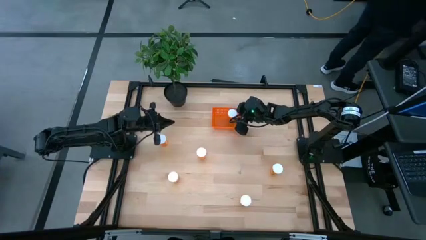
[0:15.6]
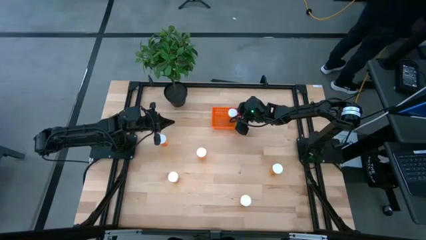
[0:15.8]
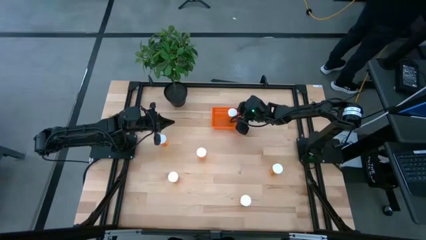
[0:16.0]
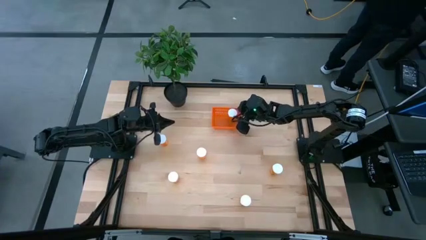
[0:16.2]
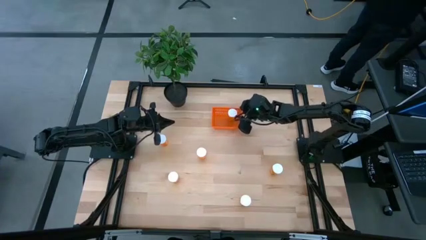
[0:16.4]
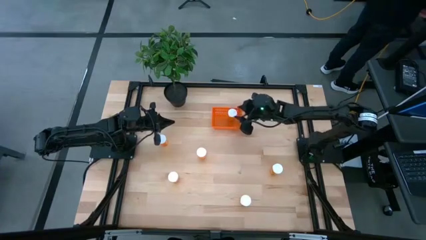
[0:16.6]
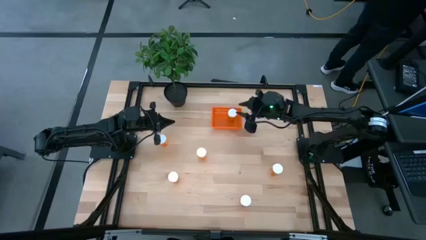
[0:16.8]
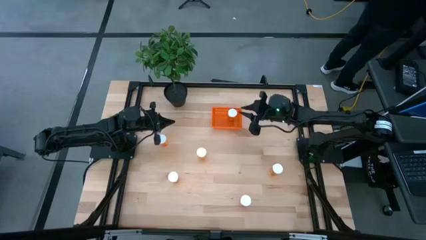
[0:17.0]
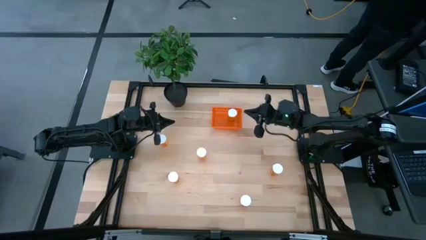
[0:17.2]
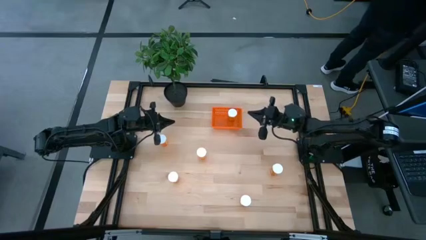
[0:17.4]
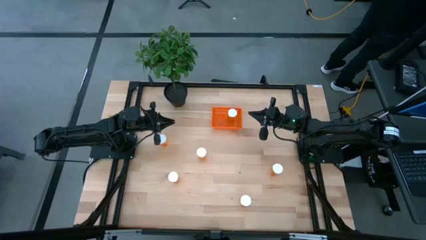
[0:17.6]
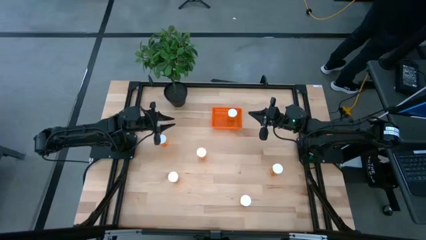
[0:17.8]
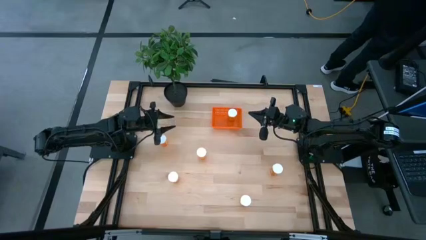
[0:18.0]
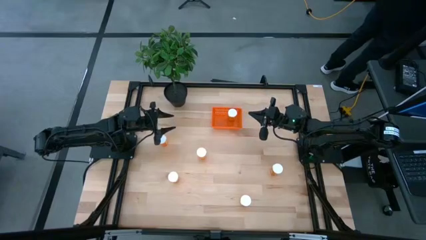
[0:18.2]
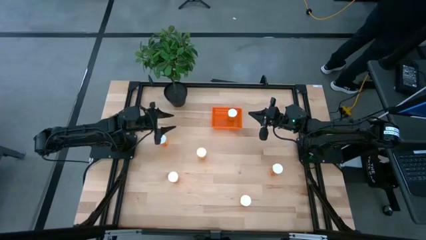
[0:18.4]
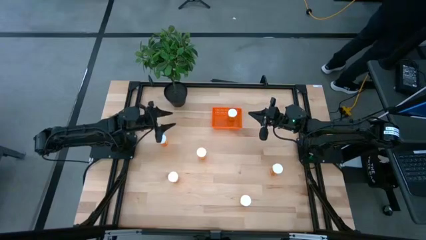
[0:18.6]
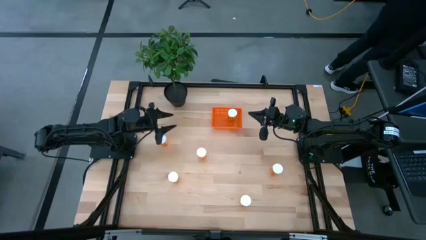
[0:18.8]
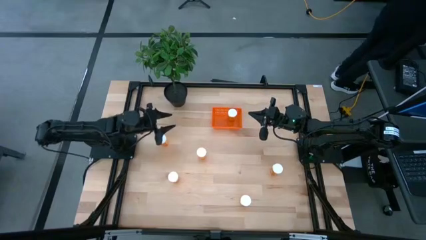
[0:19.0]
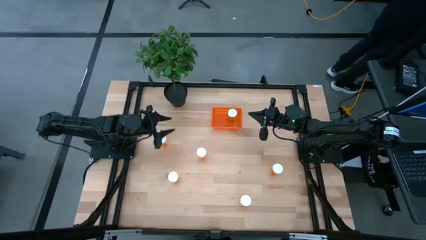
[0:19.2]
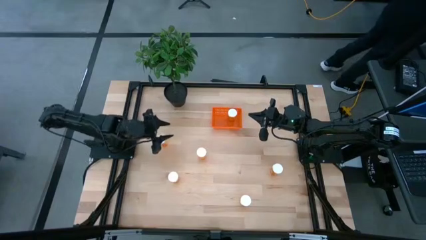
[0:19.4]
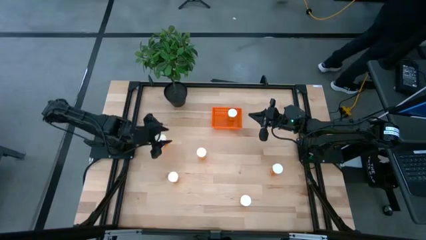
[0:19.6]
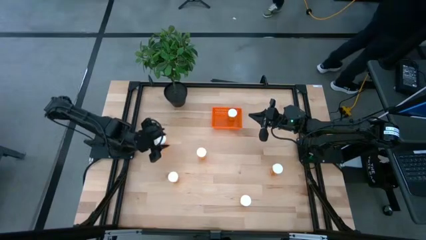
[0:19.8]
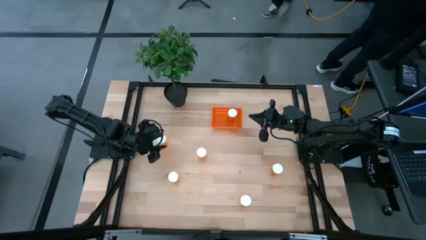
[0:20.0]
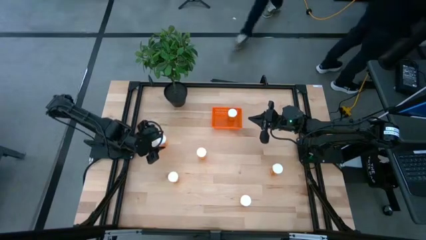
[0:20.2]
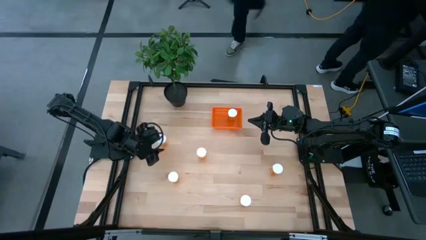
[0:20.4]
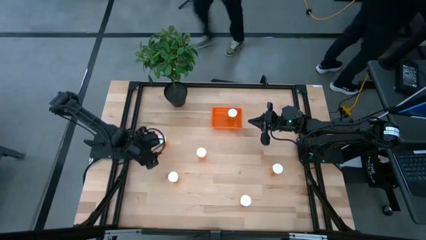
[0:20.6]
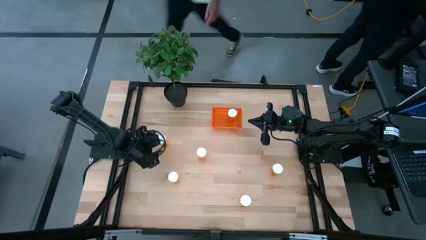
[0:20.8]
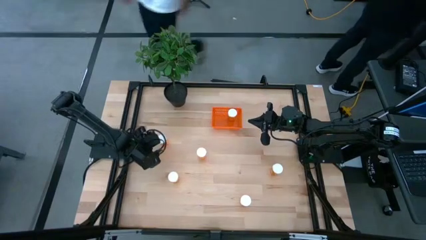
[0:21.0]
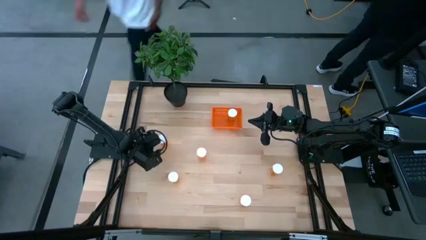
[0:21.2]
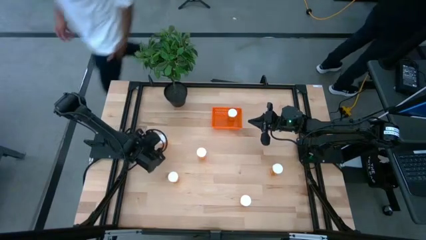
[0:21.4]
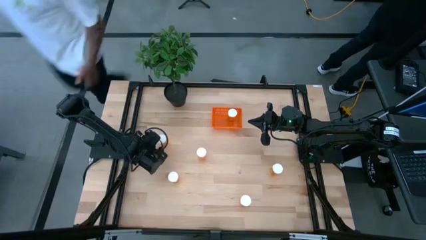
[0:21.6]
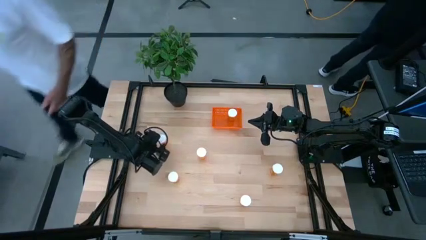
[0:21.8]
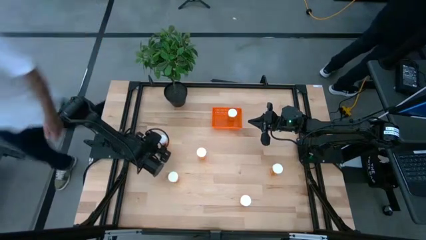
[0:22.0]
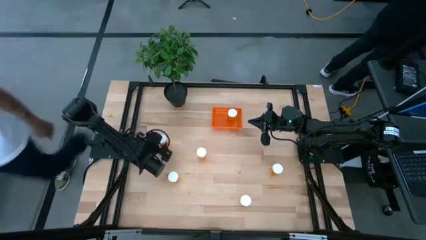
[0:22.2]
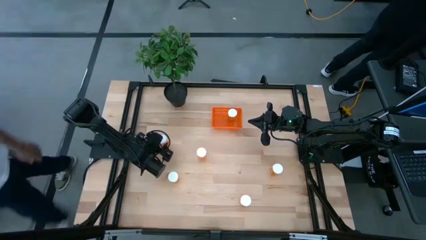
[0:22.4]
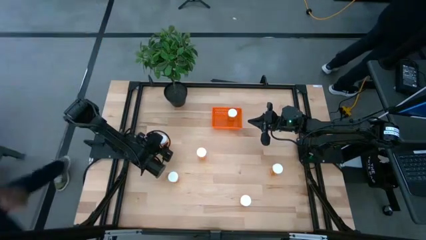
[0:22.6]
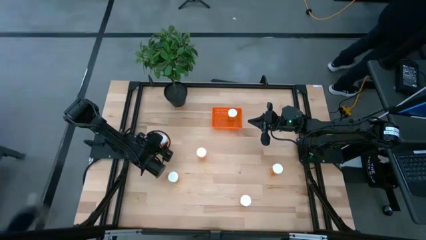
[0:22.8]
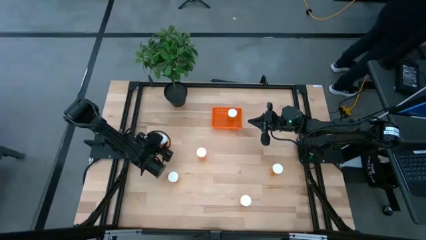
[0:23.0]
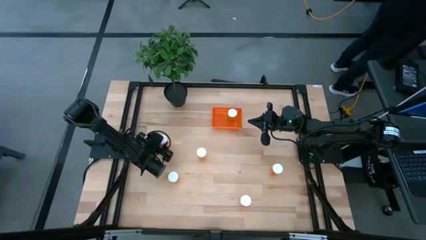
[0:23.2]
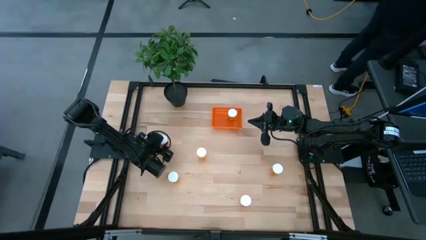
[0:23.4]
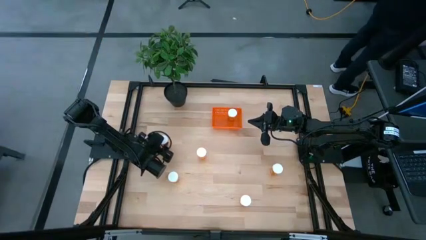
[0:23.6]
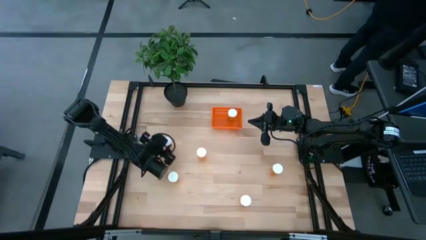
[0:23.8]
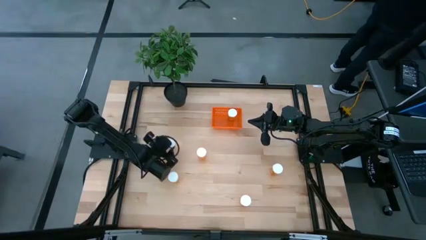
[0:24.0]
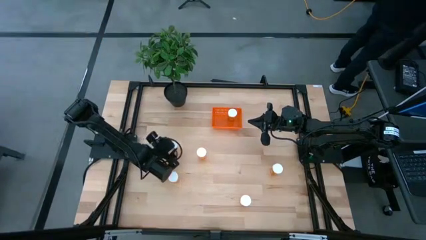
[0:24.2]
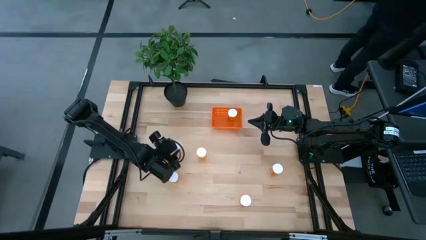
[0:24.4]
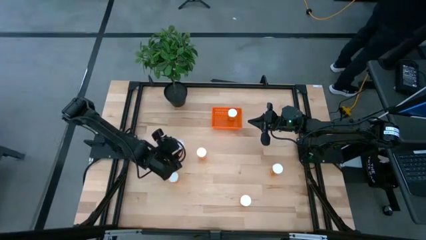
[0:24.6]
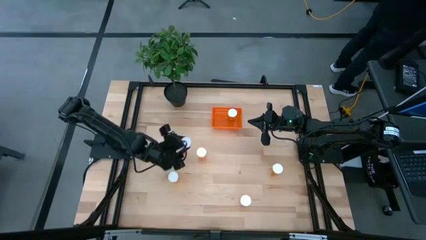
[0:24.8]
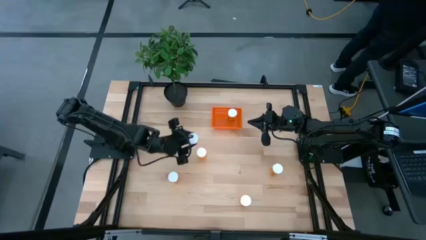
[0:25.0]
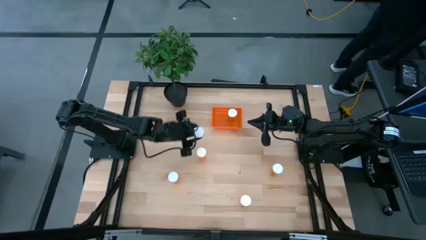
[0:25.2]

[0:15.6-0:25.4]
Task: Pick and place pill bottles into a basket
Put the orange pill bottle into the orange bin

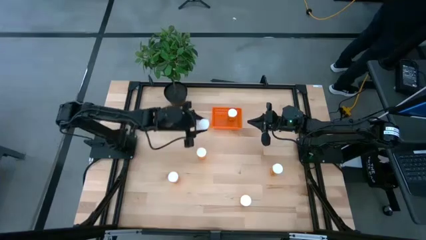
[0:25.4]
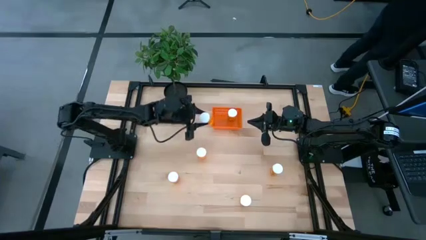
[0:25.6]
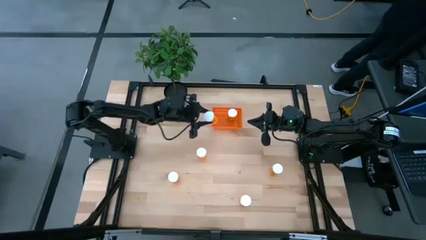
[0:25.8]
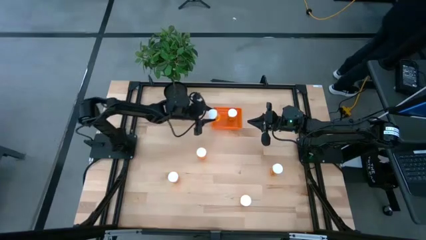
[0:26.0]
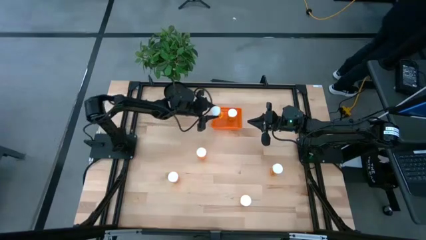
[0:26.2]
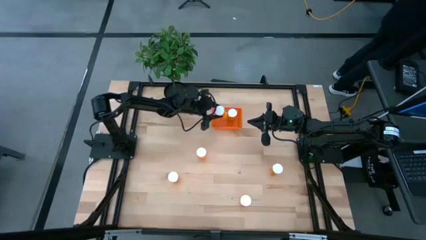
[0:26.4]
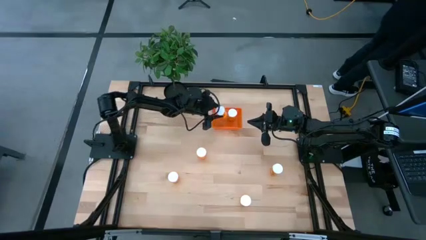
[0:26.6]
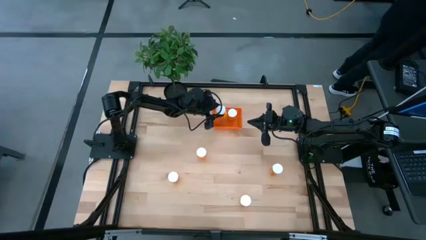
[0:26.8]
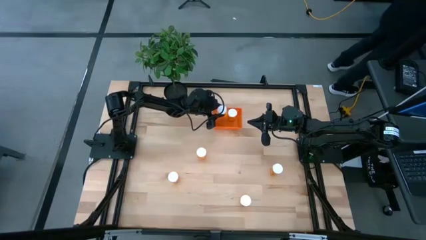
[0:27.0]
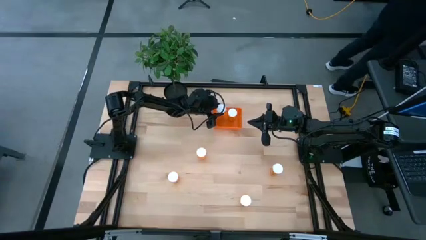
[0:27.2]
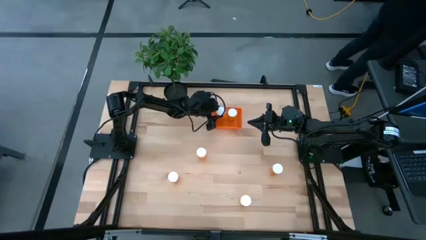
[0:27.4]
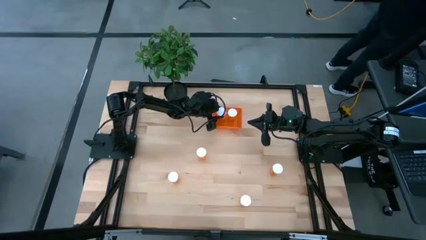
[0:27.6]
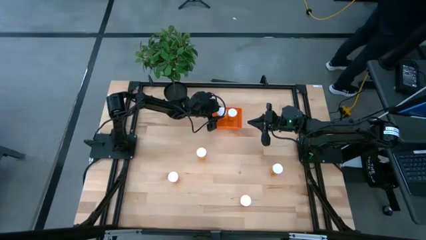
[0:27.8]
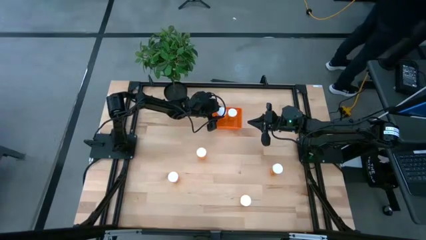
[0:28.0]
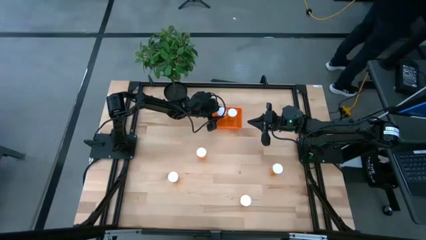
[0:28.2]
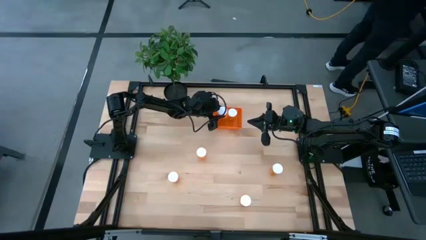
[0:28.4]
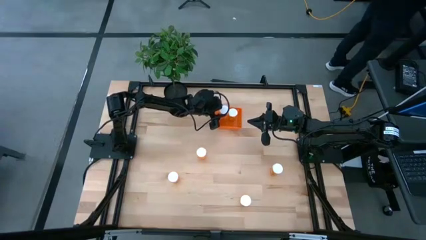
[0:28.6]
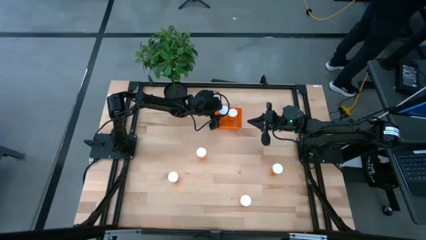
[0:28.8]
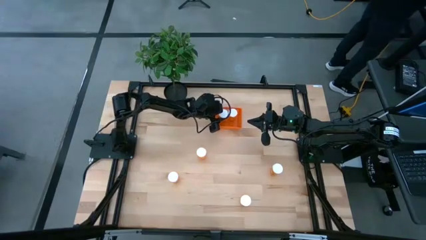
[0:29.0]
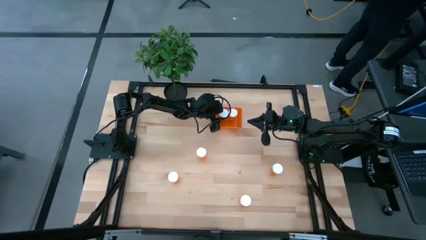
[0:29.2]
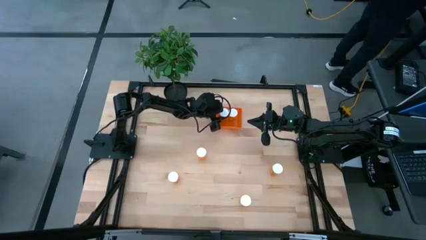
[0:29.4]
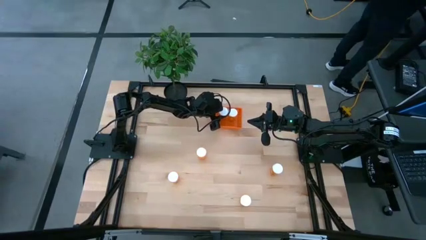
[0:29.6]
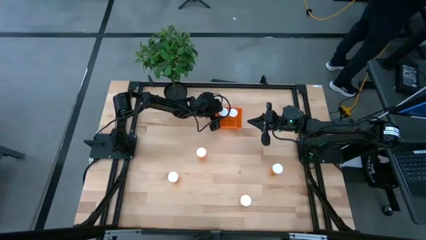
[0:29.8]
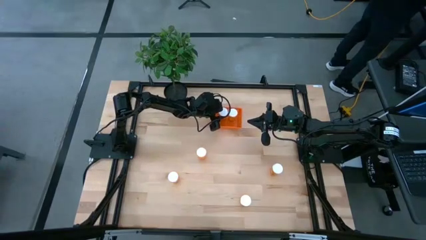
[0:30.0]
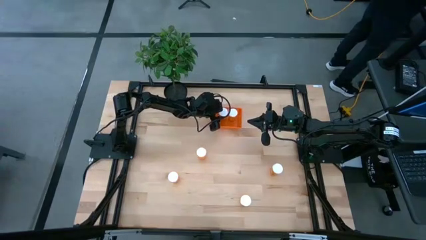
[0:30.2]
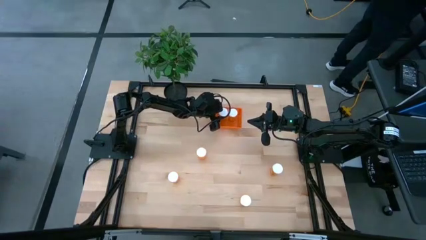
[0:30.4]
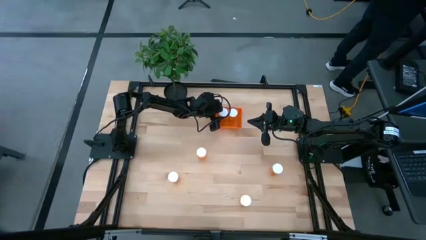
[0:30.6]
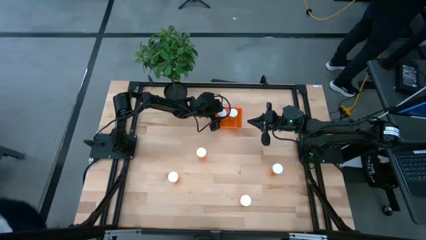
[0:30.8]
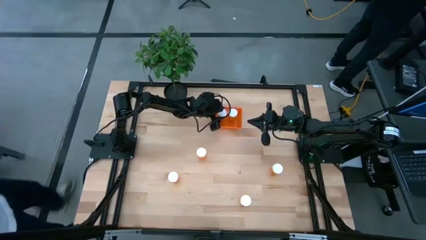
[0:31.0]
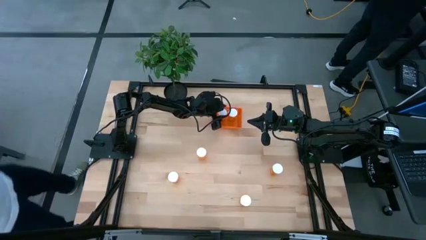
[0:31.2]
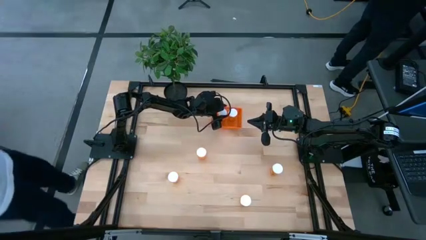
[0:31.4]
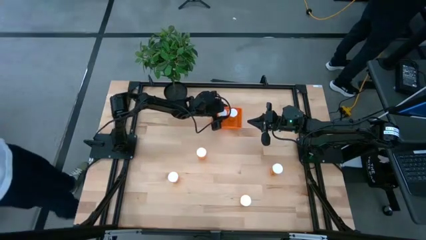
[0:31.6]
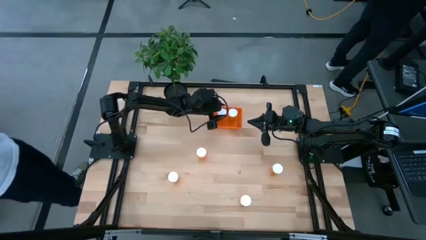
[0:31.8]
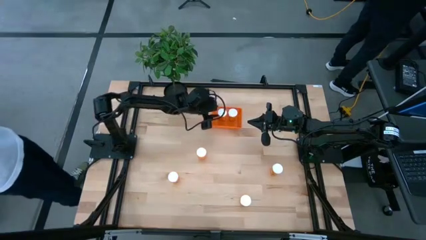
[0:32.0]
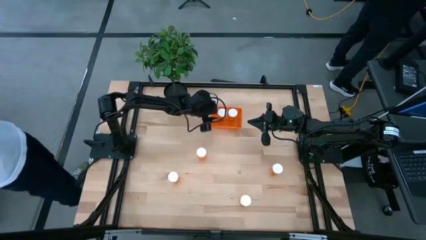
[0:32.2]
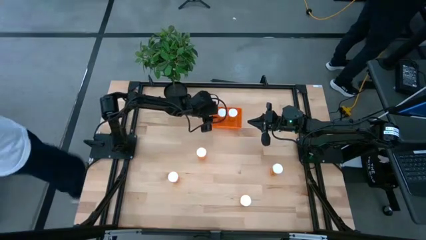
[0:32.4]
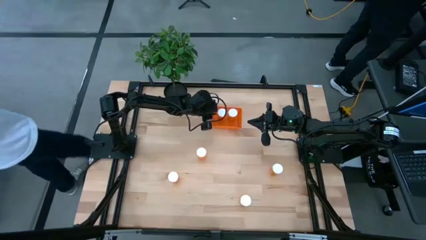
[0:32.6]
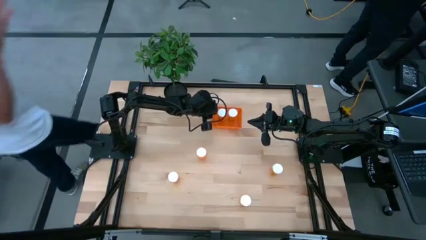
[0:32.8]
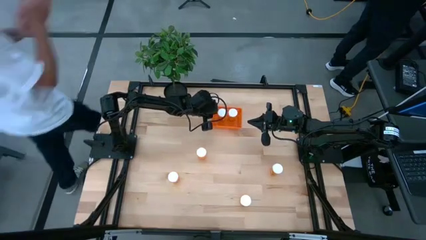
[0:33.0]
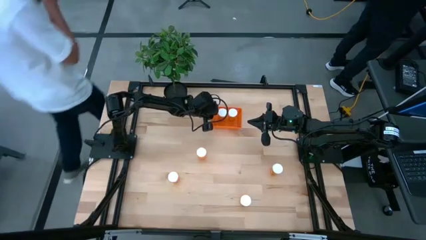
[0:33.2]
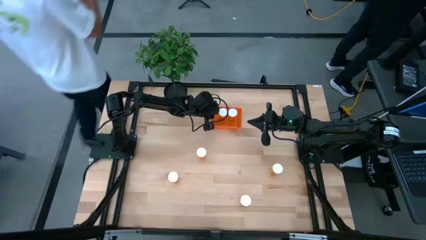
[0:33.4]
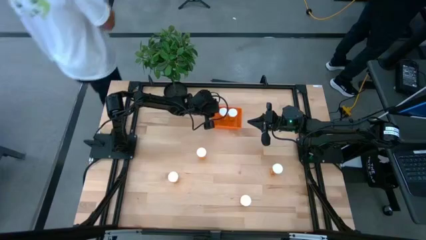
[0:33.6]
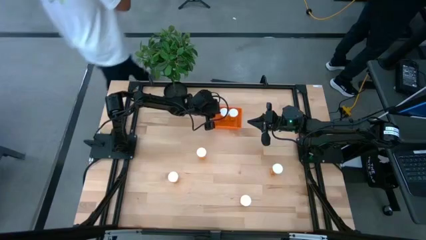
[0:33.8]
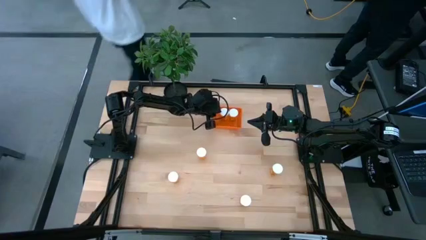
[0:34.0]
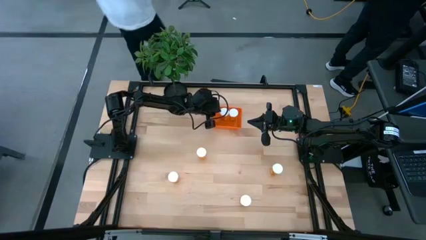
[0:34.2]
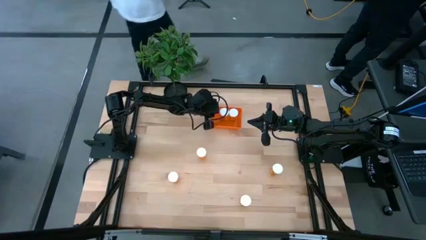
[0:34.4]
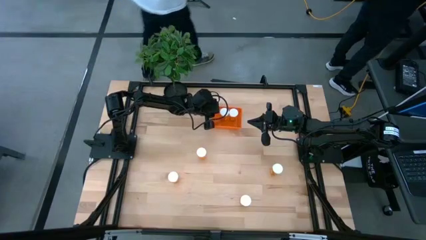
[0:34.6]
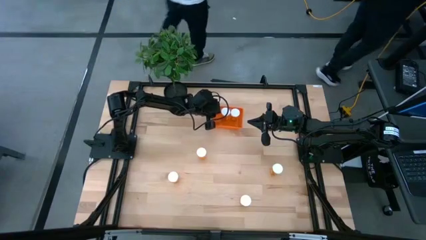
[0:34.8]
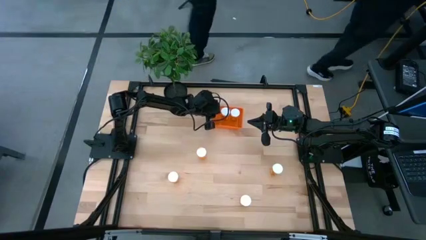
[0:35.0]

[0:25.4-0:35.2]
Put the orange pill bottle into the orange bin
